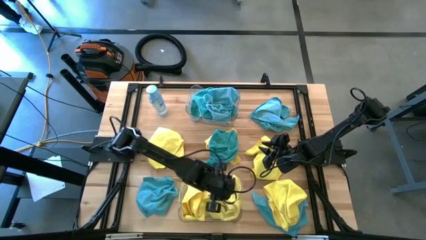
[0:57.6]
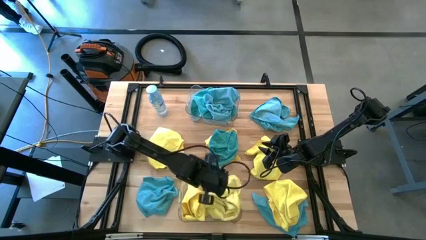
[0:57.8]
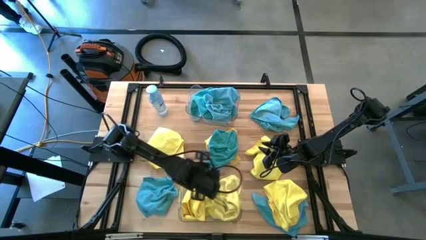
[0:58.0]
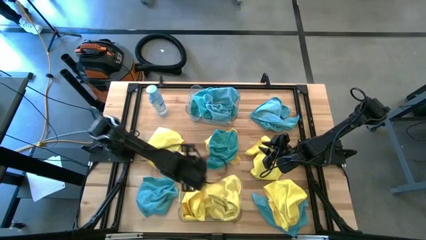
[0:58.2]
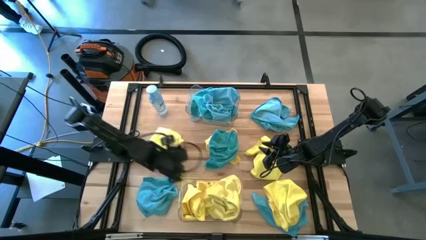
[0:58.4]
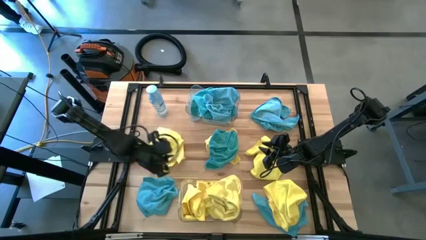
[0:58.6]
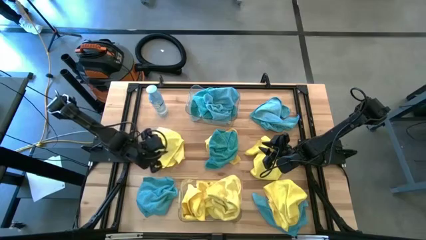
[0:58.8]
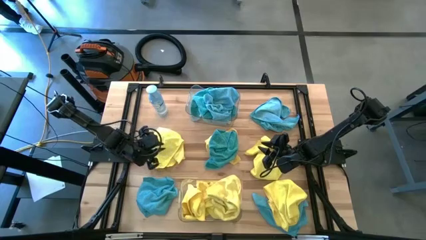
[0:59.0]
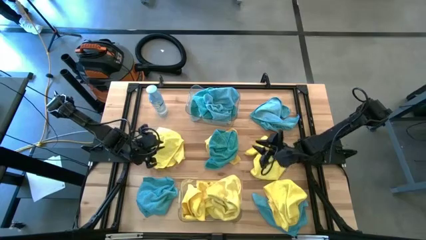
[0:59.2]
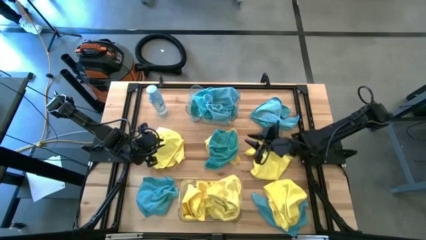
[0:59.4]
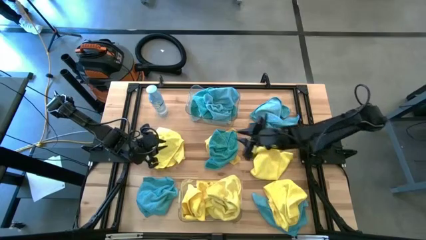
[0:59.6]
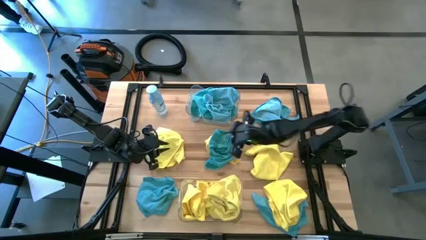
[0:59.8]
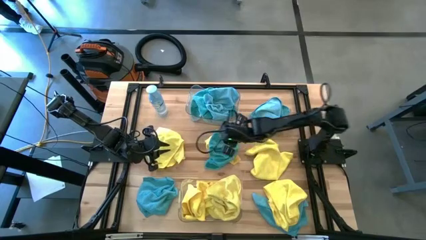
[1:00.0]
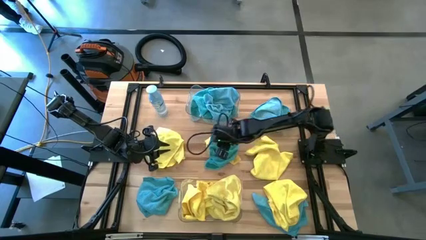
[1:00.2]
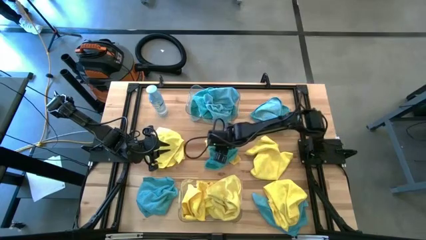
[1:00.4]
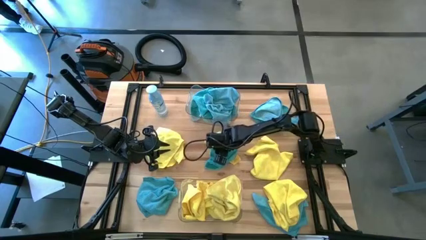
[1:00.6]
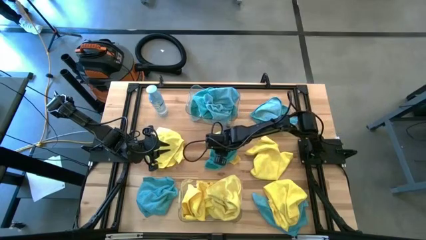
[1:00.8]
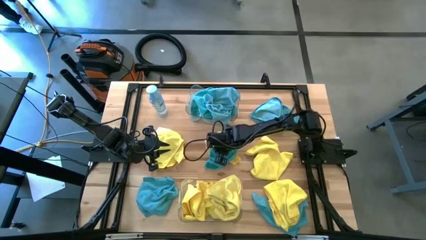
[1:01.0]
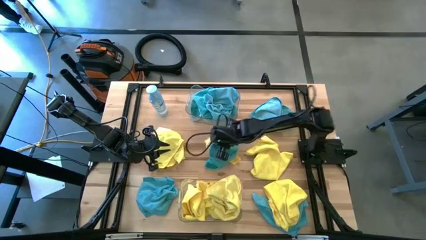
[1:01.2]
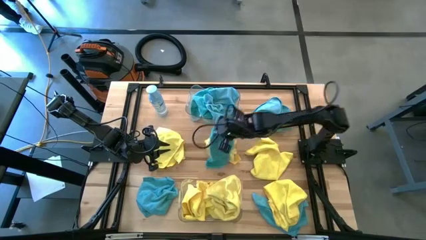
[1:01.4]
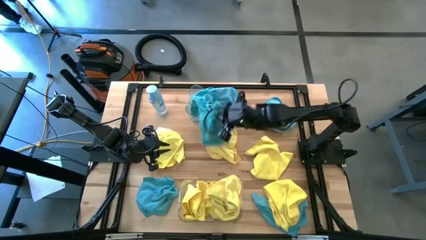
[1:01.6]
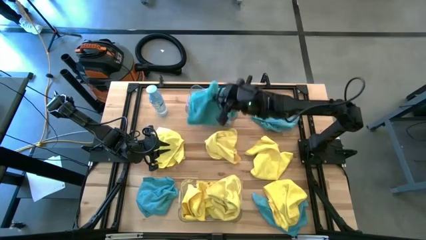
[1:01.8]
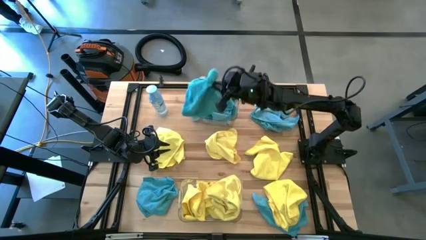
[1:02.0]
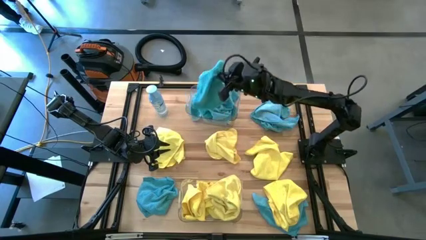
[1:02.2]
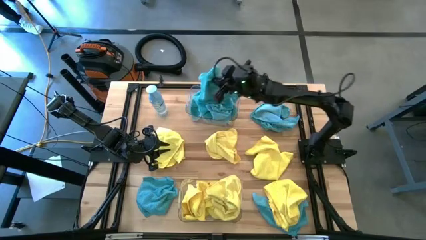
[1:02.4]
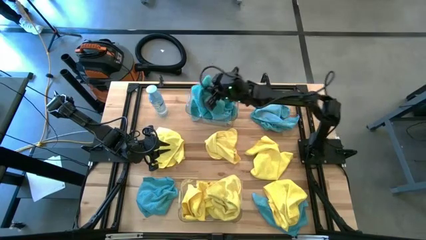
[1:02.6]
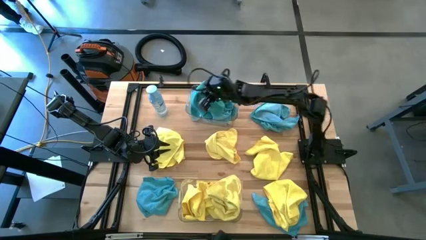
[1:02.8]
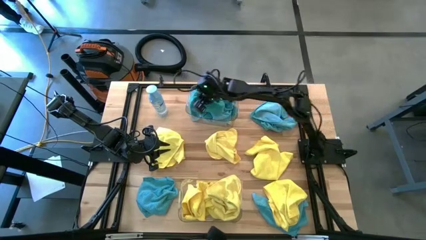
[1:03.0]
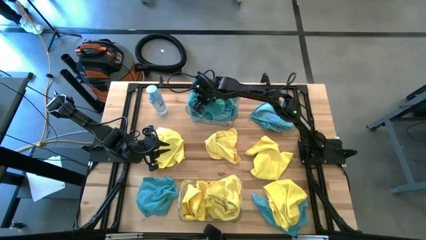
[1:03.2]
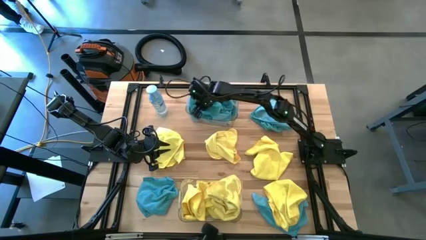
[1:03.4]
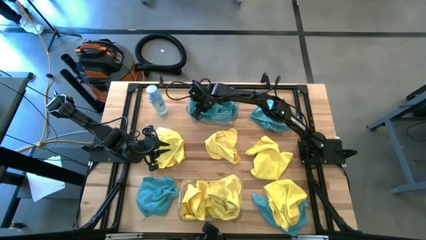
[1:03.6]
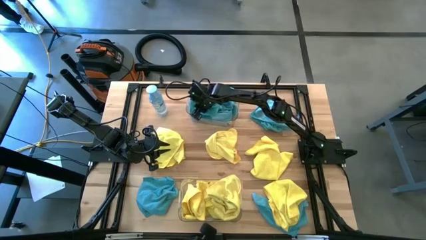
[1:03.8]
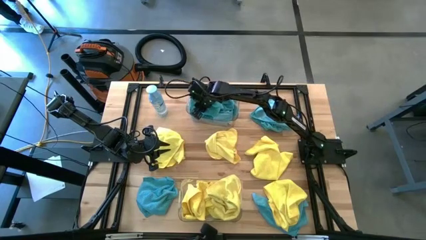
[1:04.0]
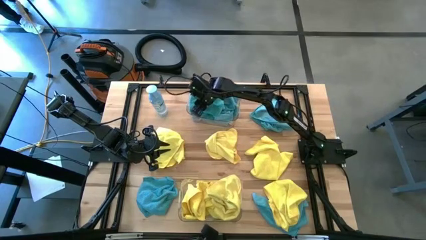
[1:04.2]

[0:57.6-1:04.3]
Task: Sort microfiber towel by color & place in baskets
Put the blue towel into the top transparent bin

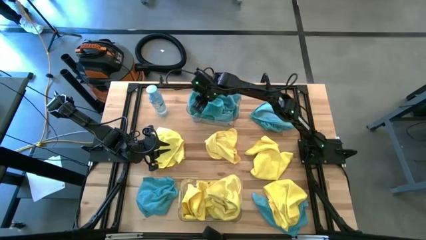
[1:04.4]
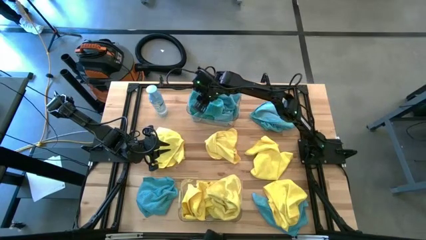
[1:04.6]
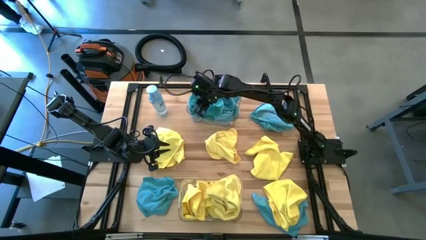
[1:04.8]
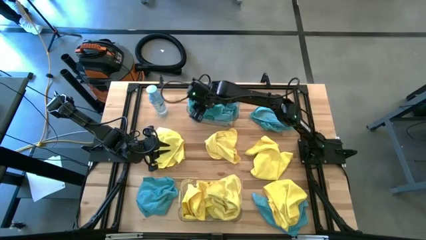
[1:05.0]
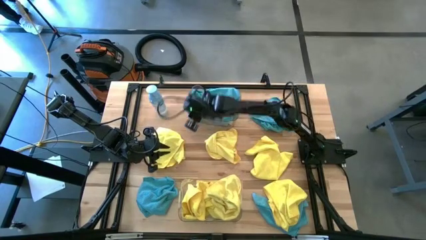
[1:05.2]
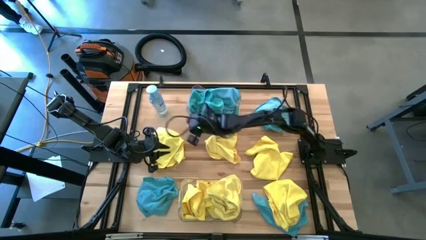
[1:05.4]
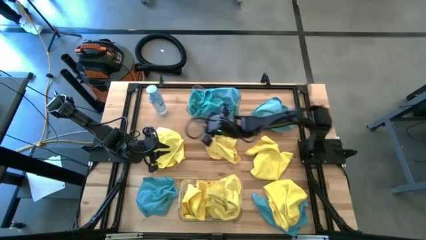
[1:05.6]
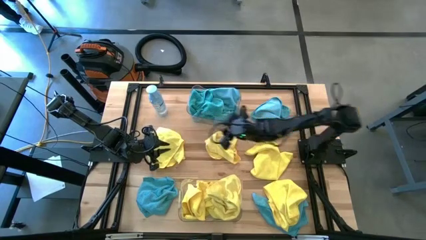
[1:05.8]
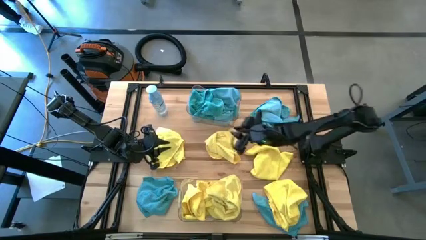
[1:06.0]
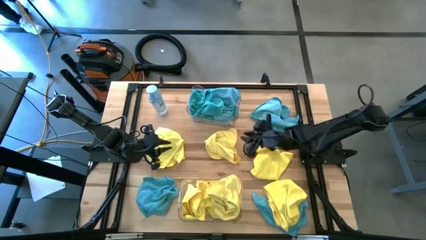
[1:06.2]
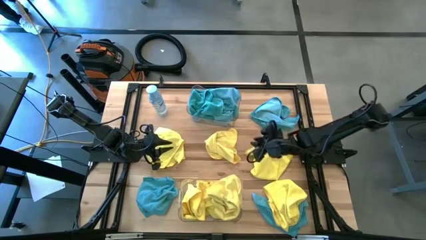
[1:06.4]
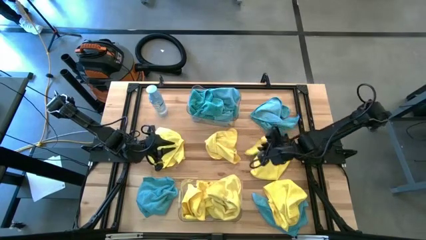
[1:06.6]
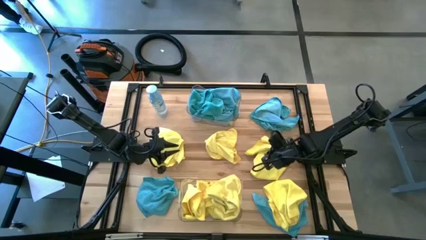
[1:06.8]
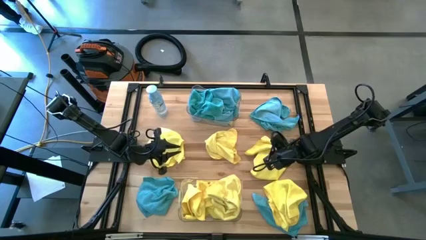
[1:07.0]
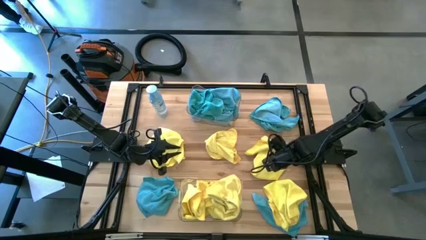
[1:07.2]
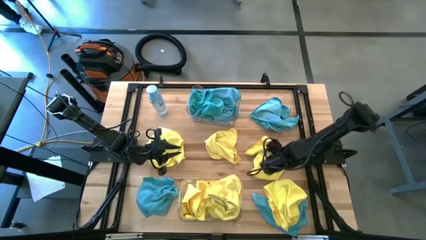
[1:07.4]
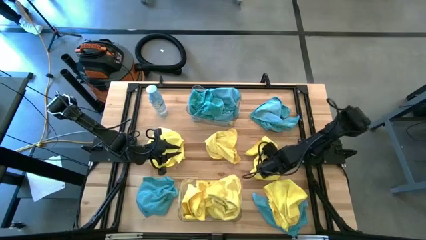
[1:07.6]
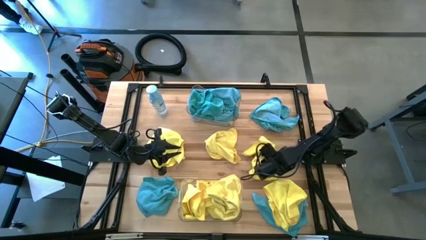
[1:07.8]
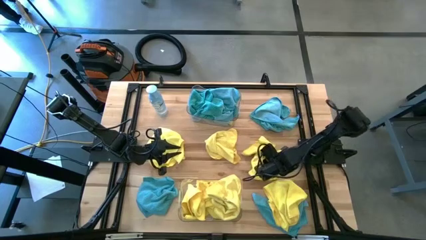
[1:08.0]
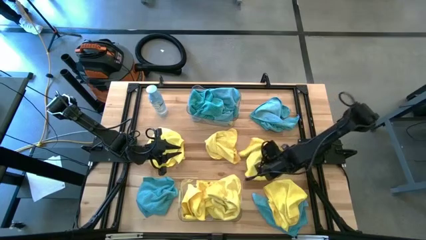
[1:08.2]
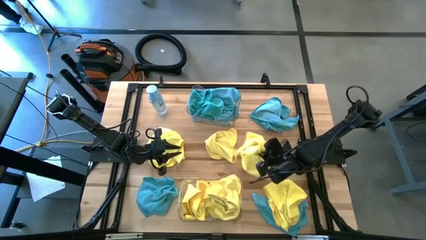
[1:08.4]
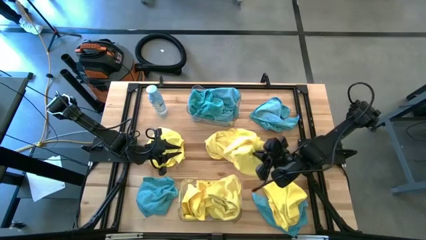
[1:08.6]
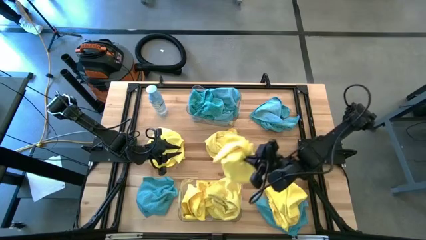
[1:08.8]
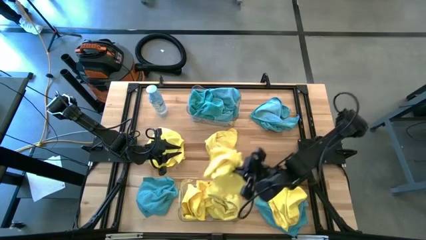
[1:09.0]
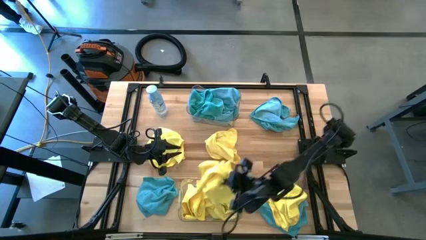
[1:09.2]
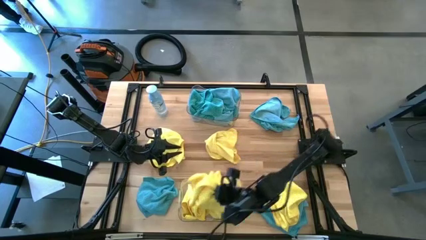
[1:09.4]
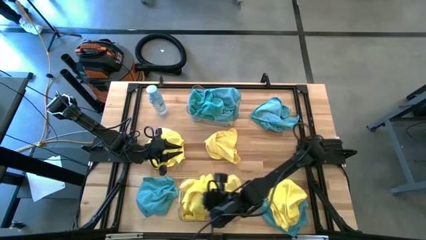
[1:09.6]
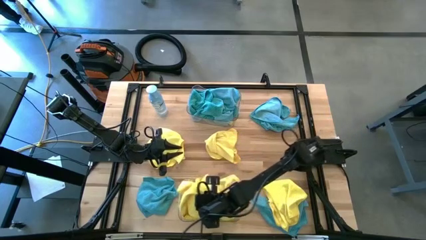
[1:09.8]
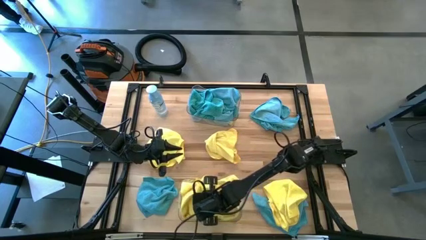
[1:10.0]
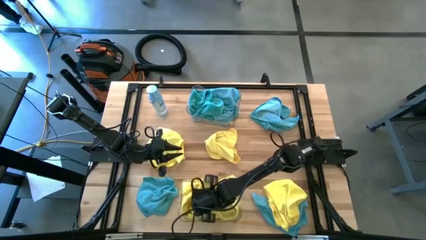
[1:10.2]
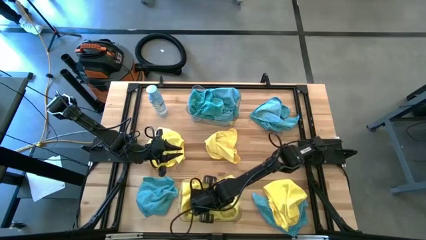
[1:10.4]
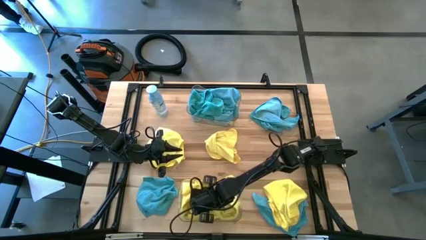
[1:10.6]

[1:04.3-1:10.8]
Put the yellow towel into the bottom transparent bin

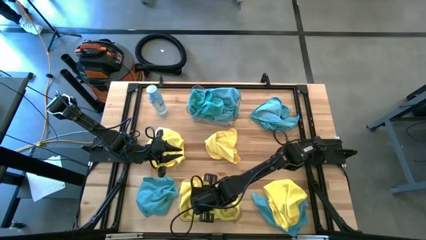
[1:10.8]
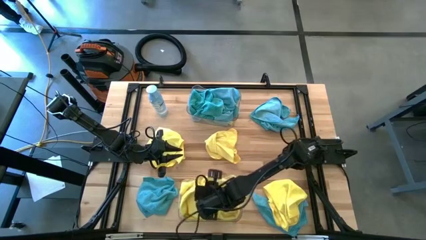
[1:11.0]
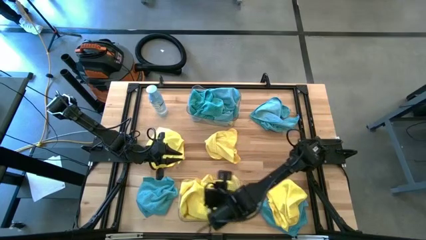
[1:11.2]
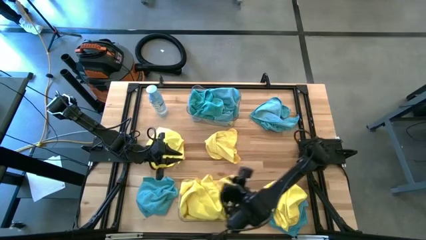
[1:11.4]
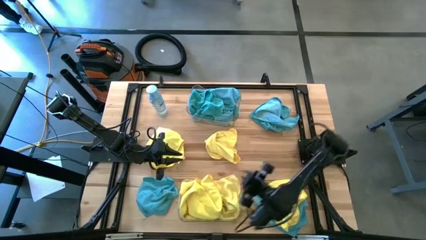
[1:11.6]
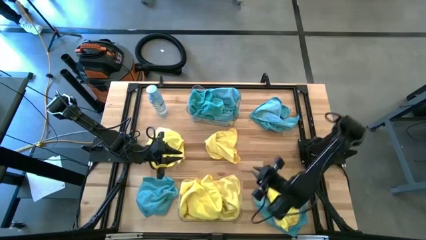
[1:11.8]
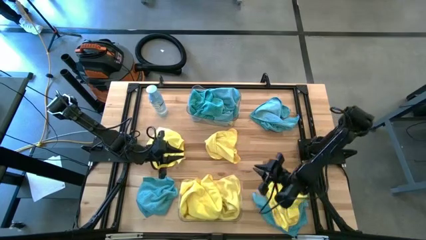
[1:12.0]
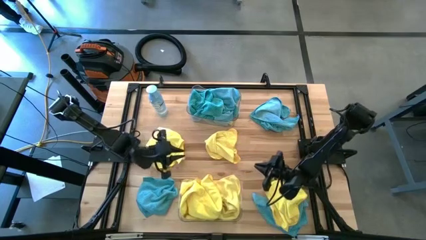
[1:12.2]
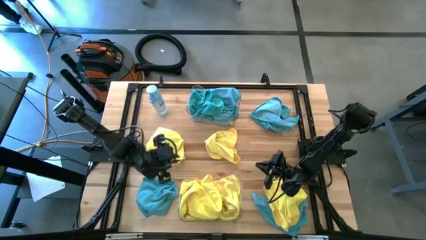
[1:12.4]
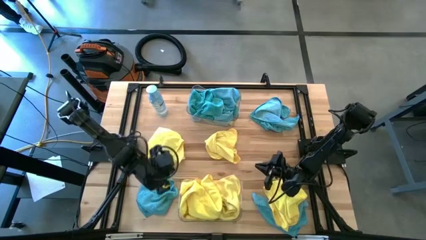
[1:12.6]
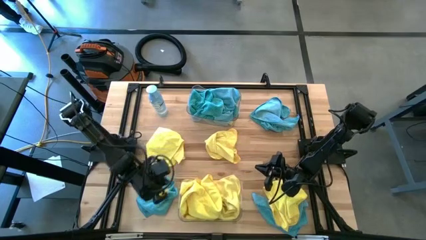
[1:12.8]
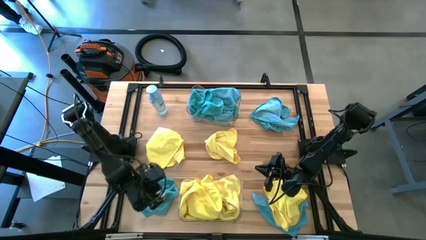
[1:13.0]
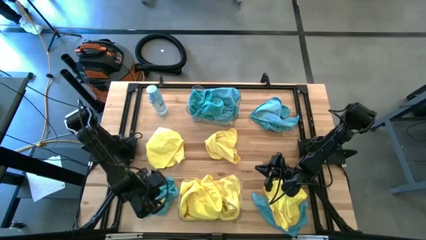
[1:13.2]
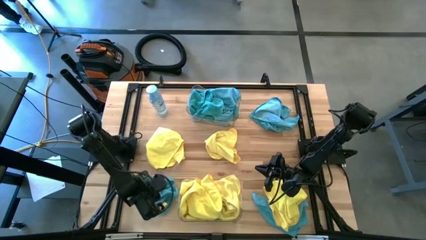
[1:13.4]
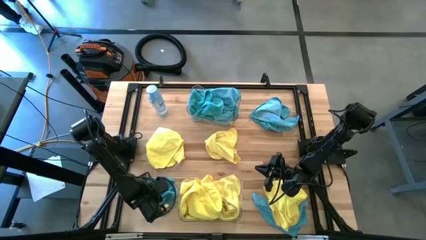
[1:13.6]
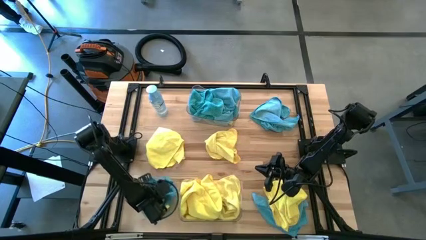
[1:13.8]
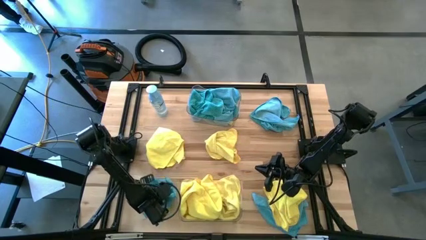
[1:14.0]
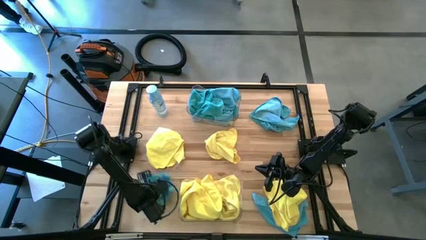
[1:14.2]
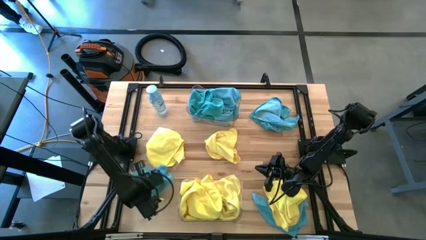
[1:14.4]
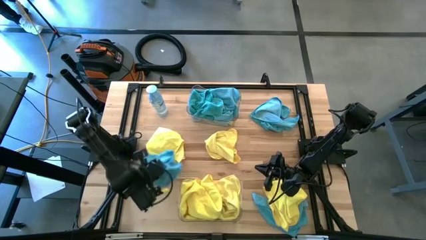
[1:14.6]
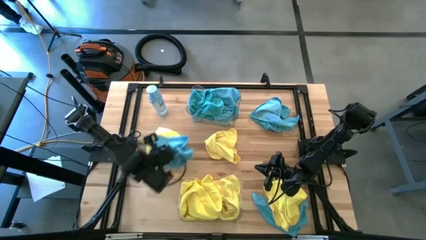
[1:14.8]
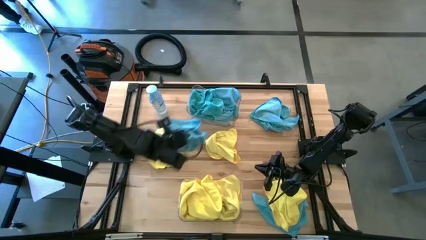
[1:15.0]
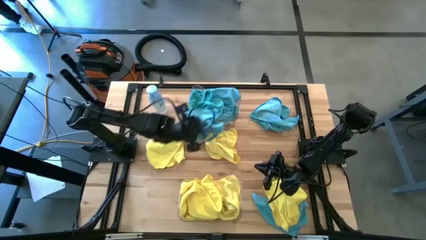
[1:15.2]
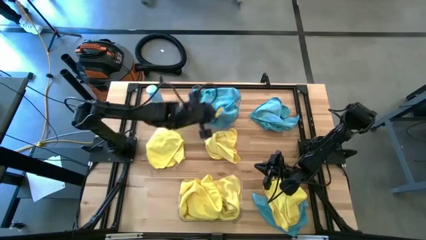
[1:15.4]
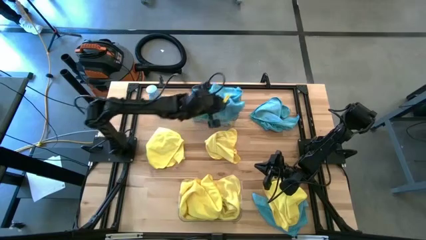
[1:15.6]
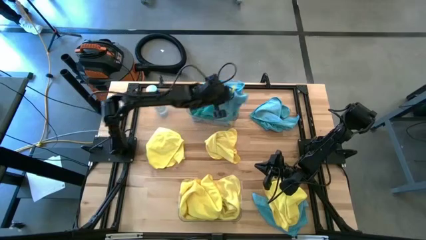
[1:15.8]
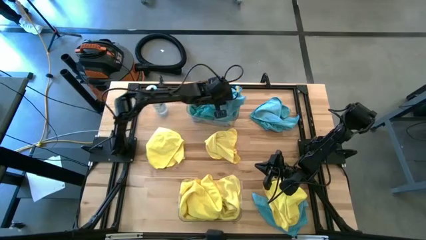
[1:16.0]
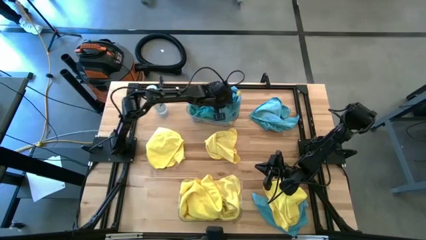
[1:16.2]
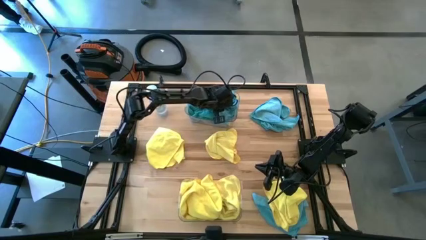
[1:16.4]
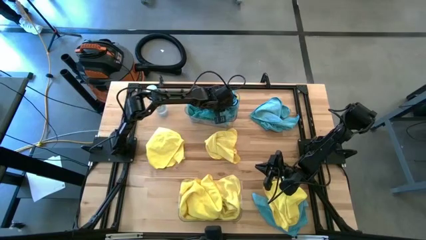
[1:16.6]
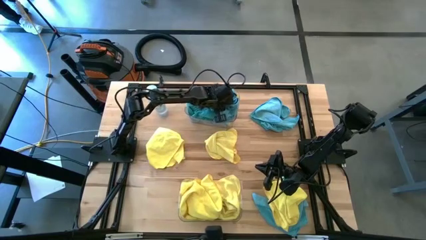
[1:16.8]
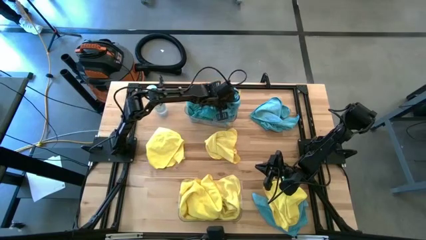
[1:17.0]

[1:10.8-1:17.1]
Put the blue towel into the top transparent bin
